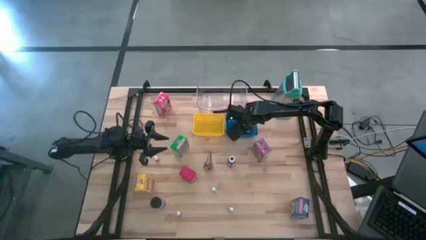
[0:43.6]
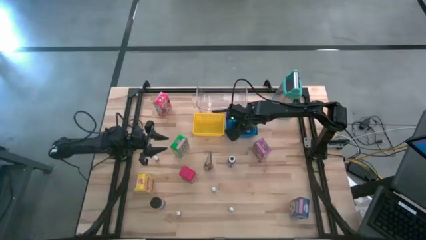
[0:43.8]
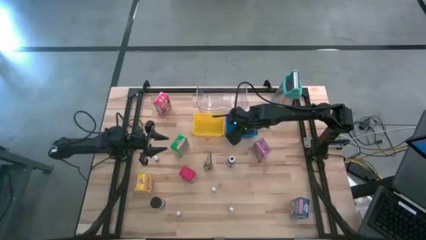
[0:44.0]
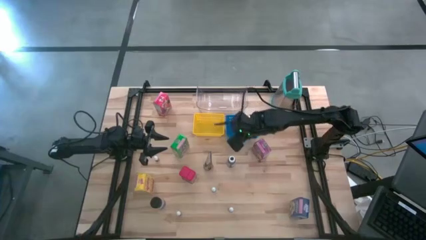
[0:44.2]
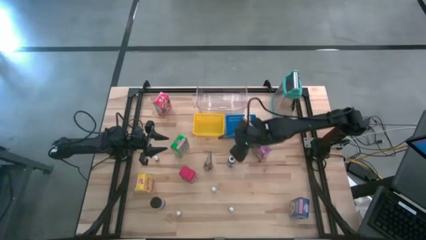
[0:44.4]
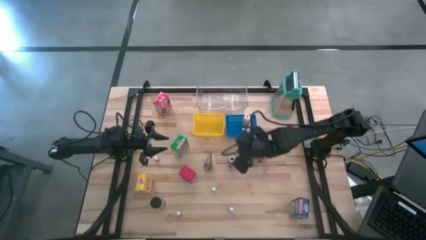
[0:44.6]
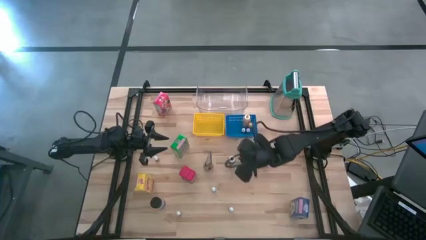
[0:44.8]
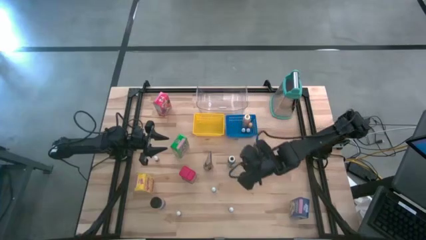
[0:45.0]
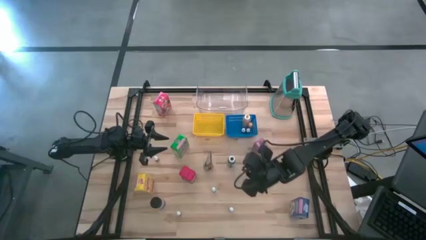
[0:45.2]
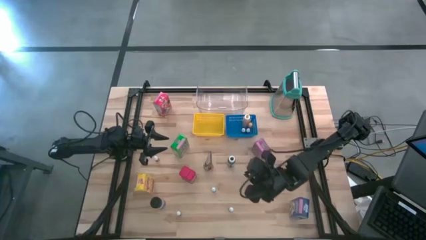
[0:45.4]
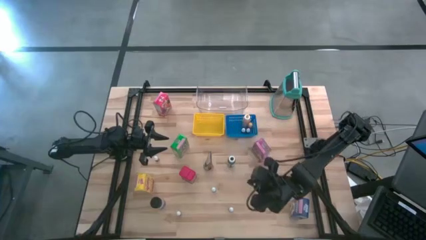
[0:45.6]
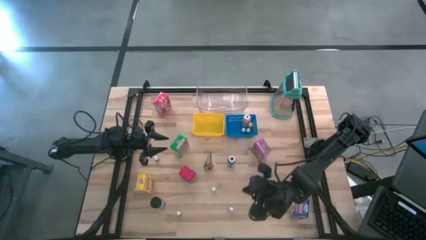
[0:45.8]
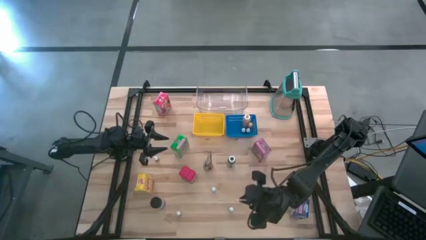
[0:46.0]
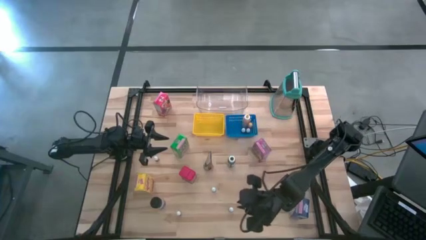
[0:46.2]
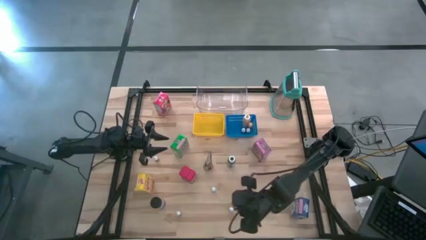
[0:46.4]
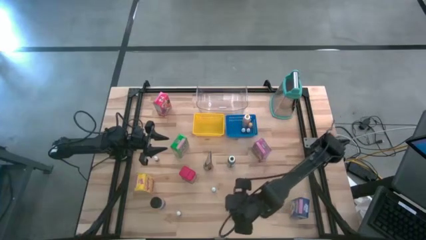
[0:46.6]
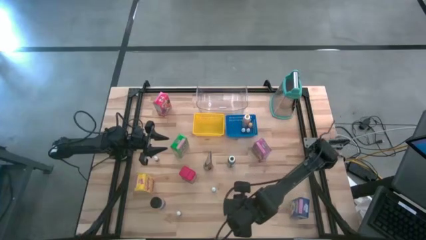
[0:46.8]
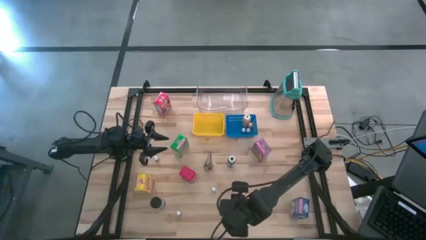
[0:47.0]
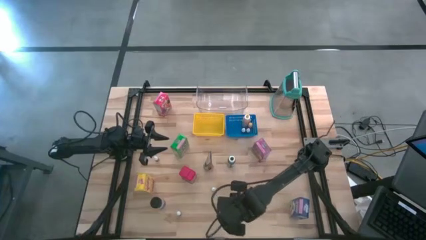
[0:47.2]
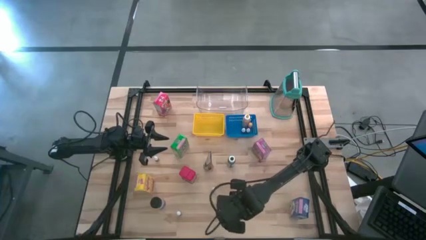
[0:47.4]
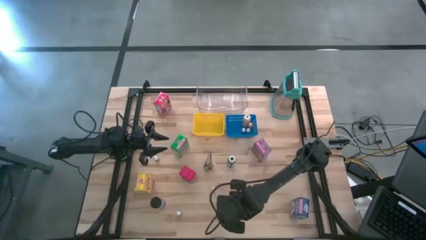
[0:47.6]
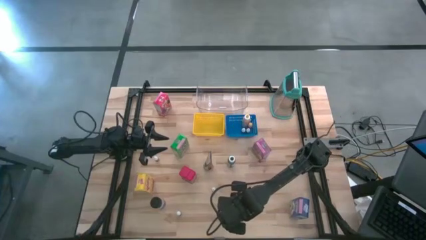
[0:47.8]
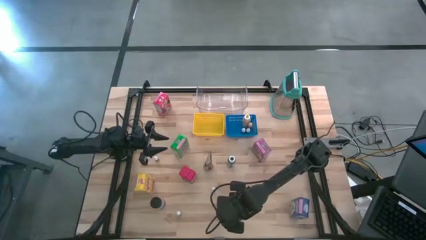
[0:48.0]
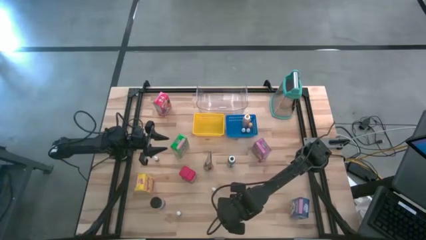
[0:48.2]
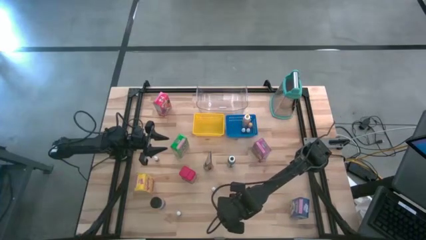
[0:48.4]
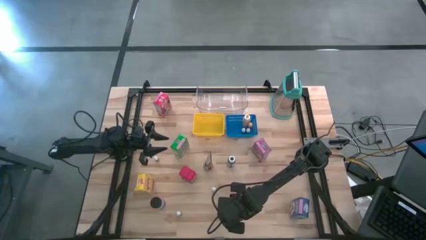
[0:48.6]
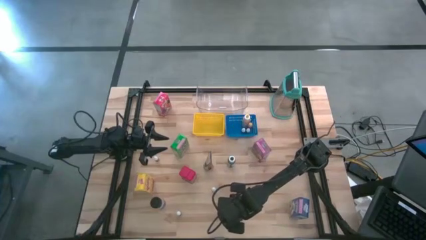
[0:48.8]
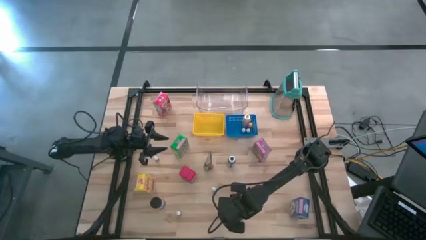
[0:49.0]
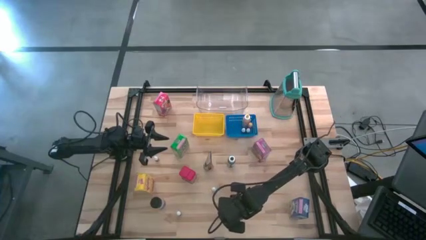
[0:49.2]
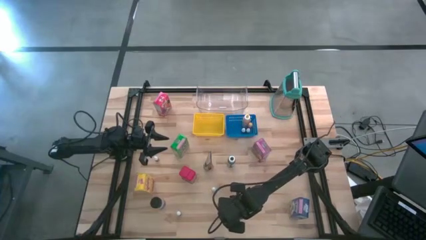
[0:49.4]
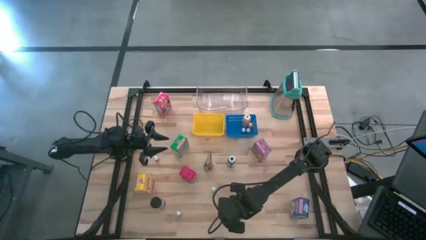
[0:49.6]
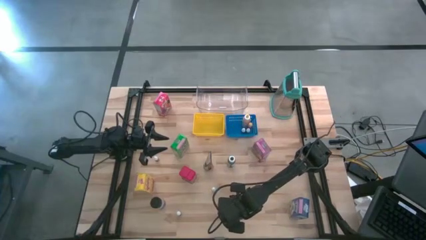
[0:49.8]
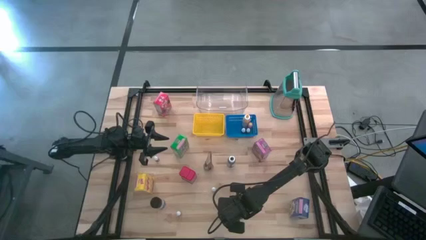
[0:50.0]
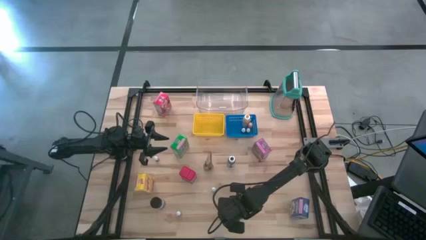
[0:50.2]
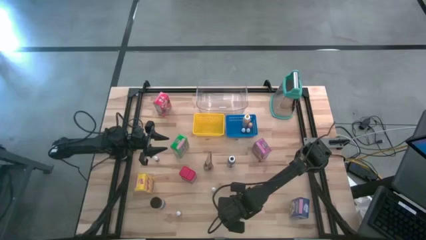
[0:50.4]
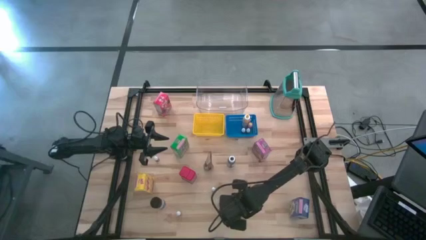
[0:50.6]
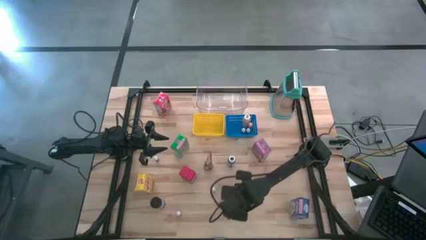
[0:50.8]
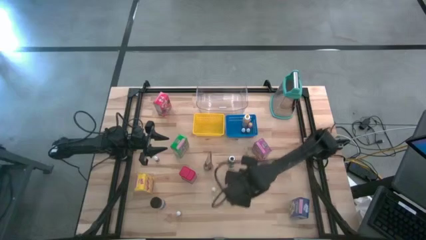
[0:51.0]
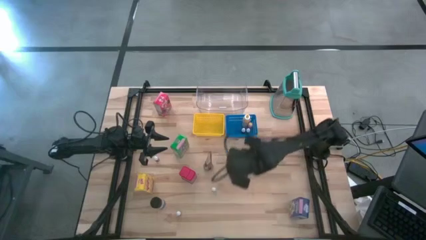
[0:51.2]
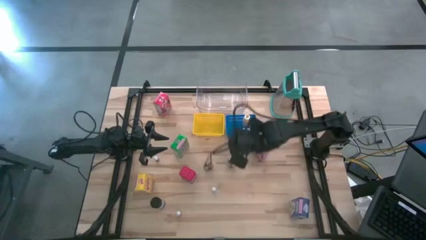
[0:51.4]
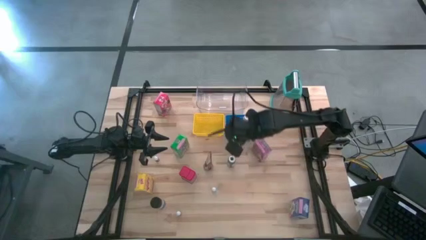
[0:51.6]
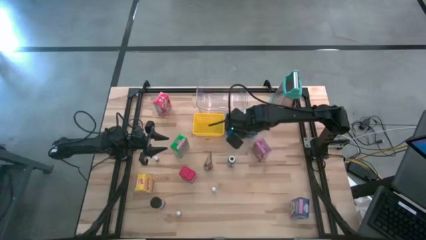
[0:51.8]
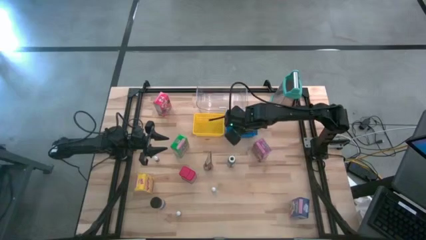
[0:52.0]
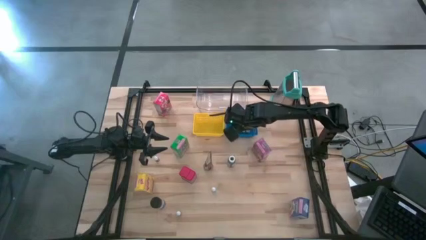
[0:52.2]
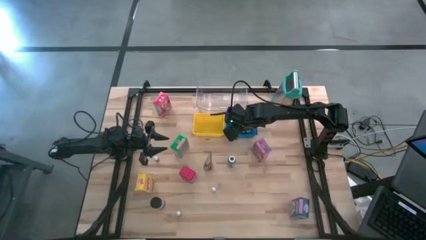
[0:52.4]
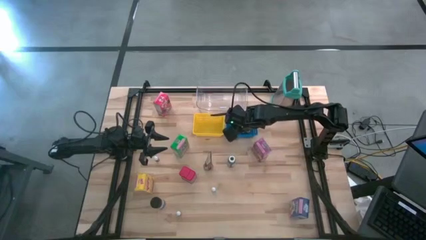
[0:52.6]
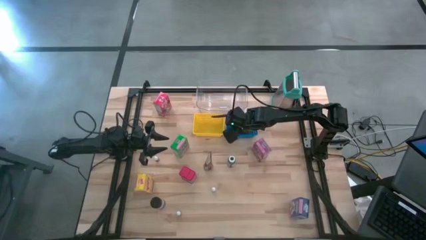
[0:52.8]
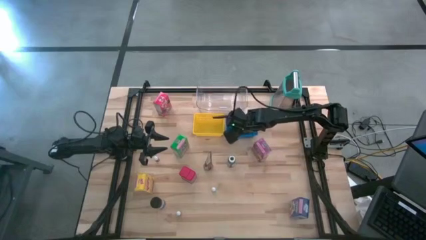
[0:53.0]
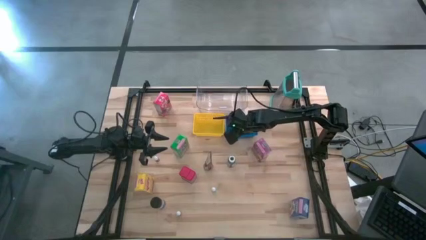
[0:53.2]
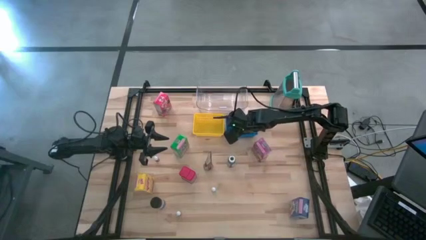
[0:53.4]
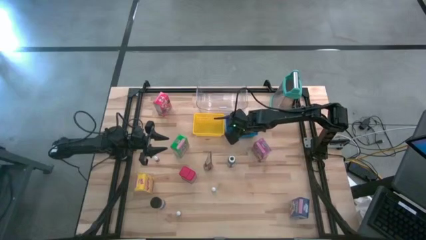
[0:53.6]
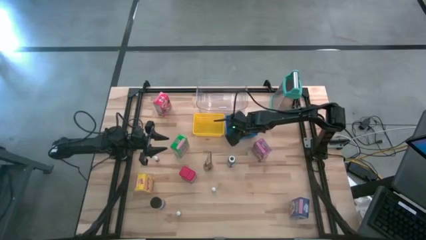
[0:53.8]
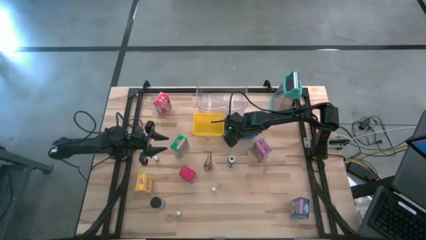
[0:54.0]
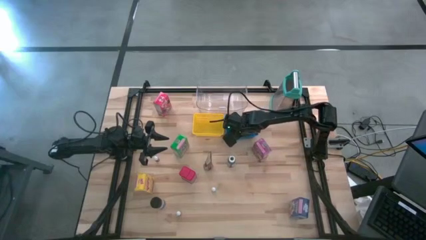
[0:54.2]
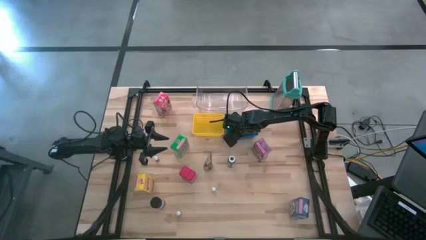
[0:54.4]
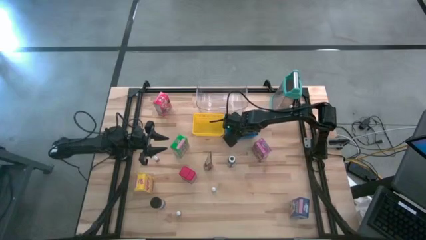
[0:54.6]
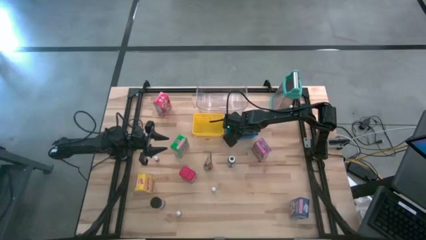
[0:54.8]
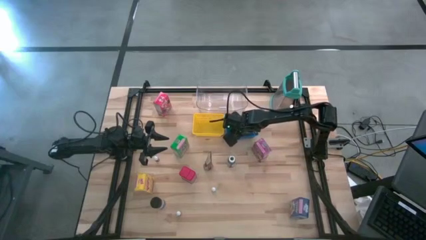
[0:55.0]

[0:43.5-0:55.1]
Task: Pick & Place Kitchen Items
Put the right black food coloring bottle into the blue bin
